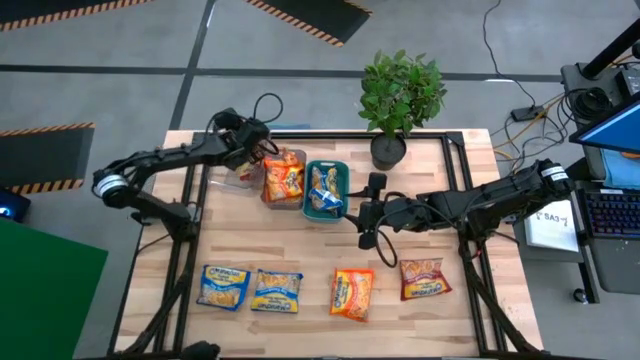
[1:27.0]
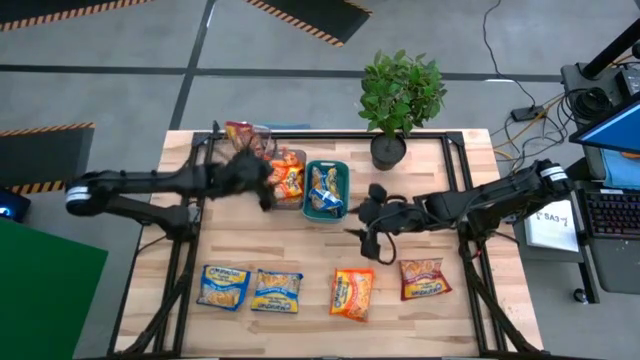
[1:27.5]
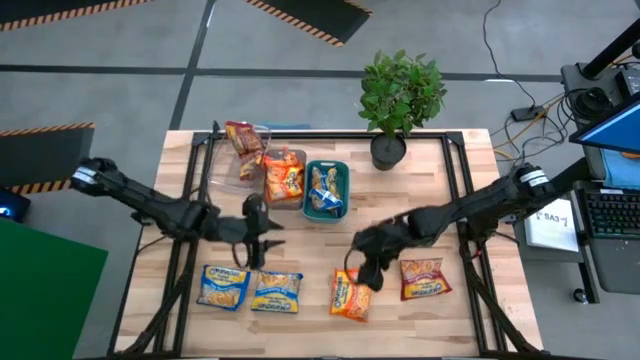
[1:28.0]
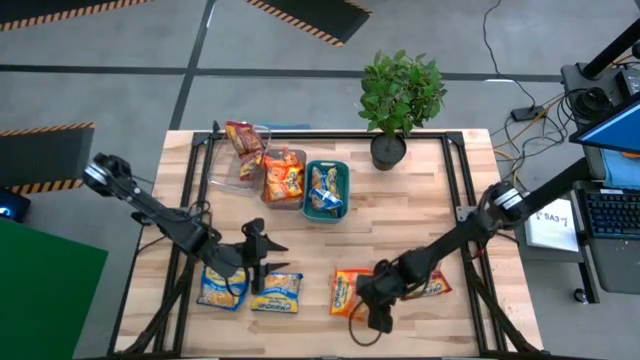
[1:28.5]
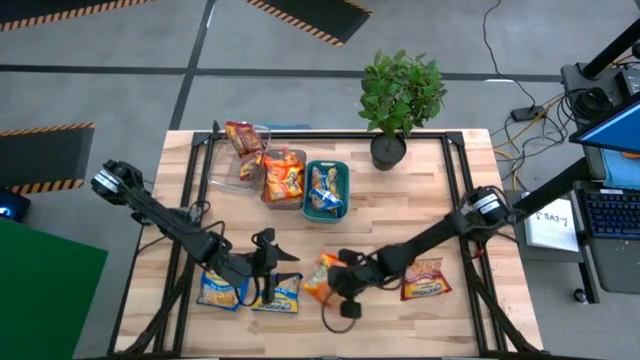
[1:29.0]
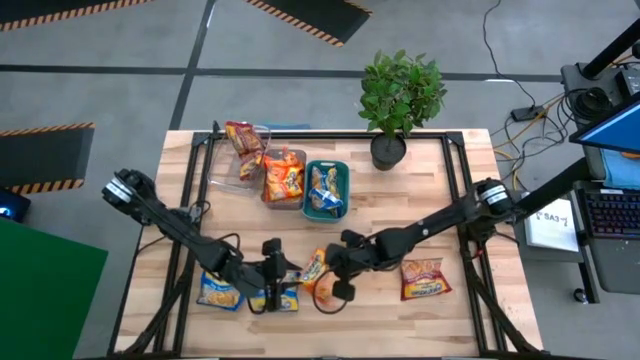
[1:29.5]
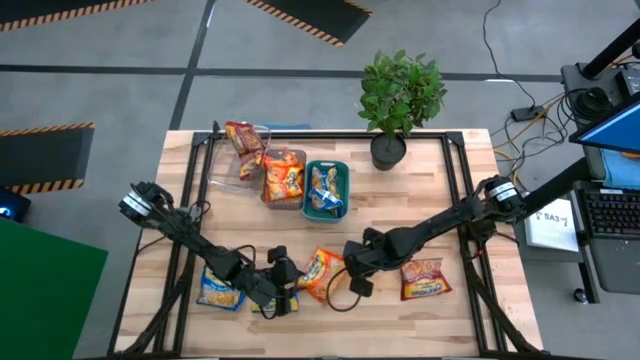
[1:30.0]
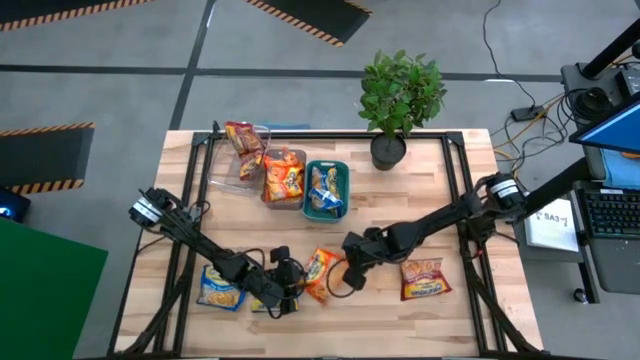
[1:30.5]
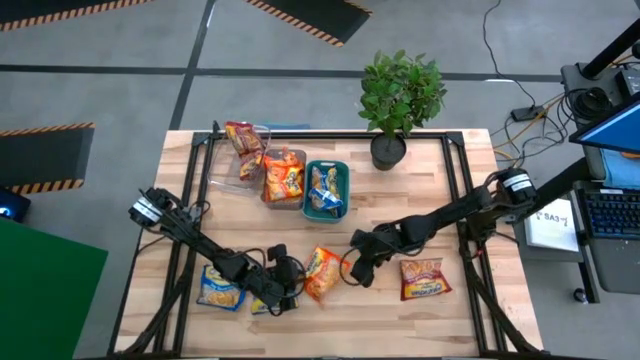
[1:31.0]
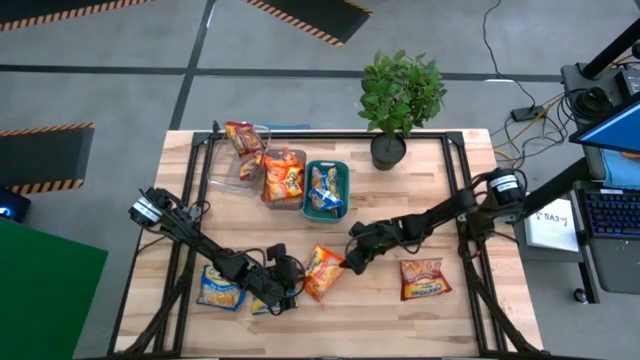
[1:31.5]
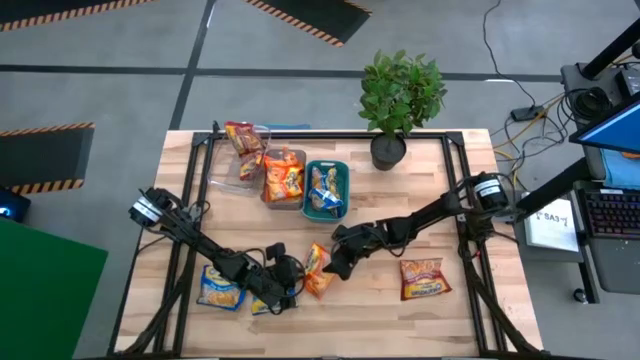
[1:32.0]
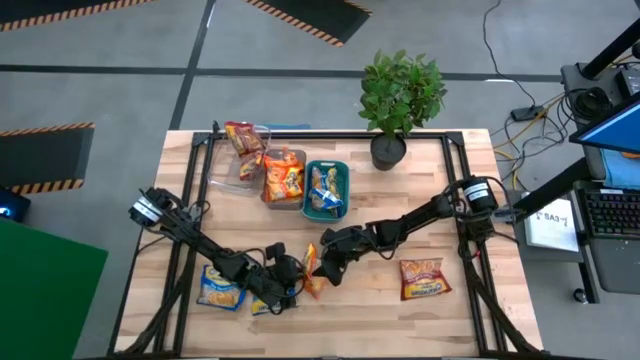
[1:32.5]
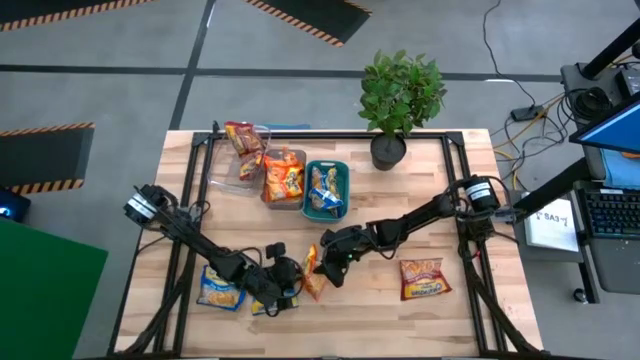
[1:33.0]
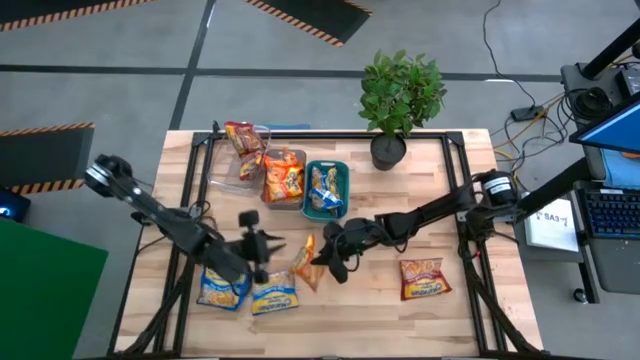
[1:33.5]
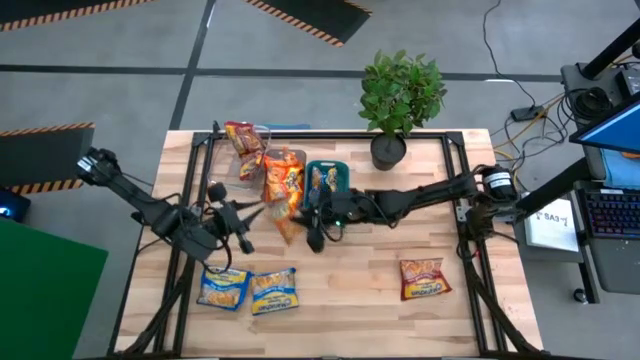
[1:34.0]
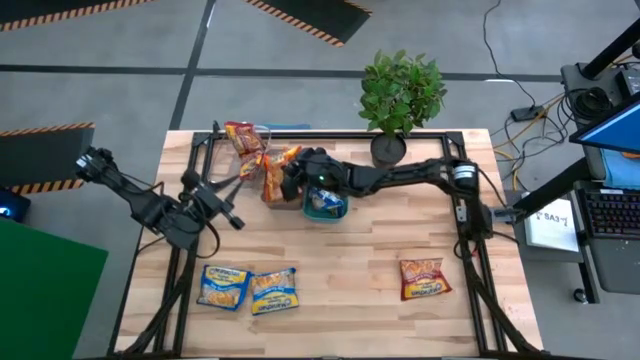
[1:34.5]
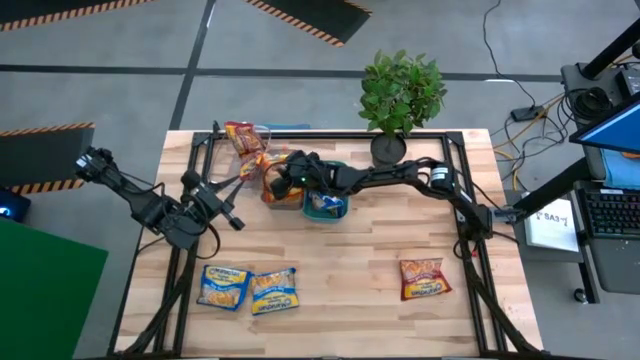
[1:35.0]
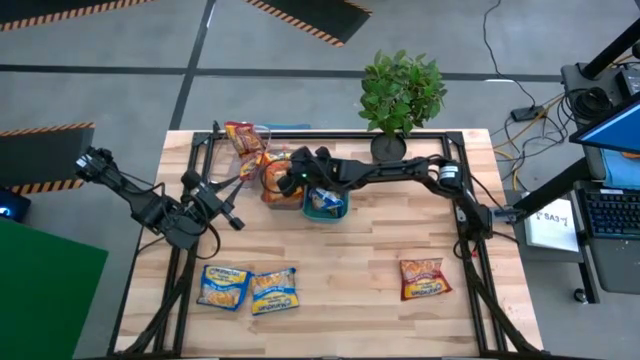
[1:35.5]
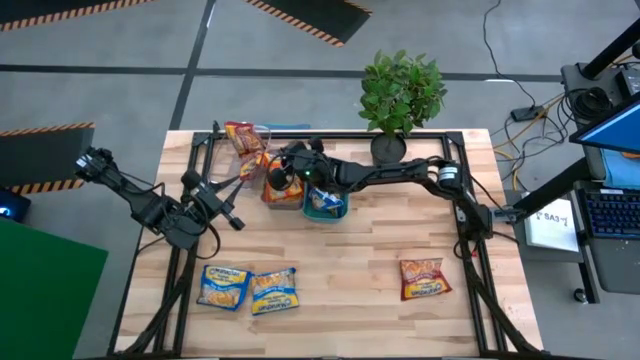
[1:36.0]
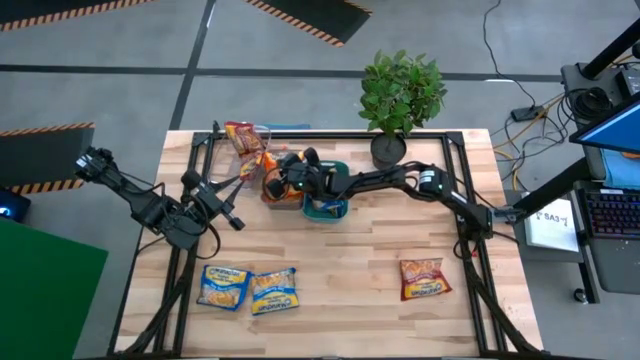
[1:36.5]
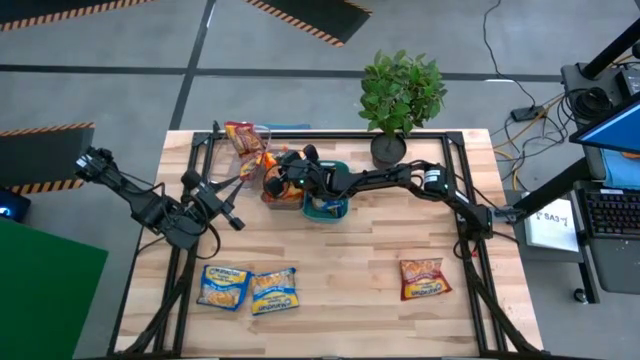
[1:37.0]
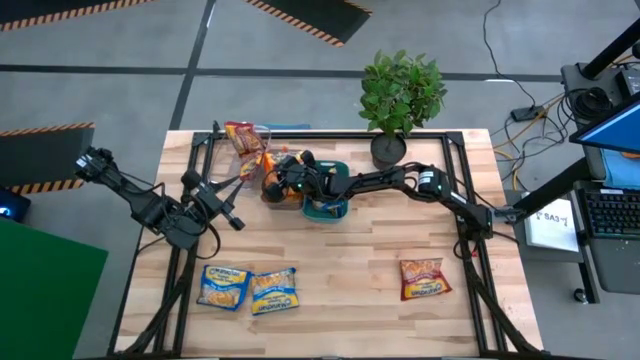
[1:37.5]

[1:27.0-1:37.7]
Task: Sort Maruchan noodles
Put the orange noodle pack into the black bin

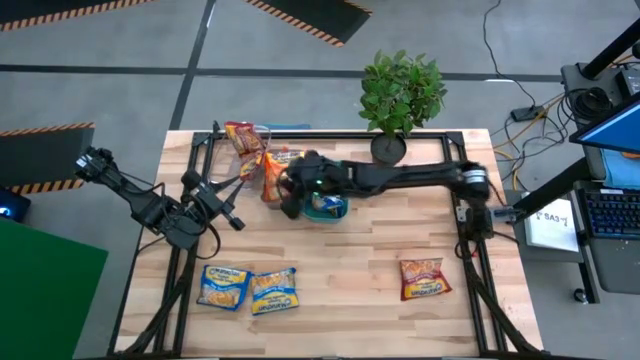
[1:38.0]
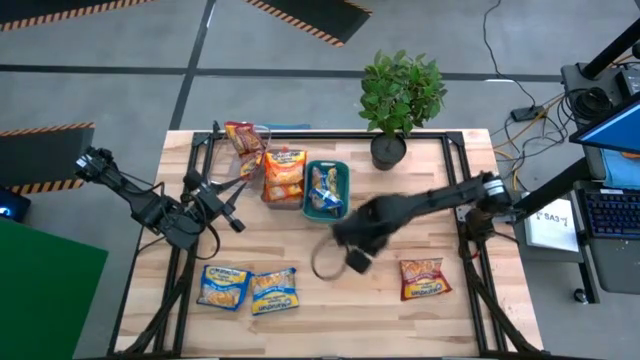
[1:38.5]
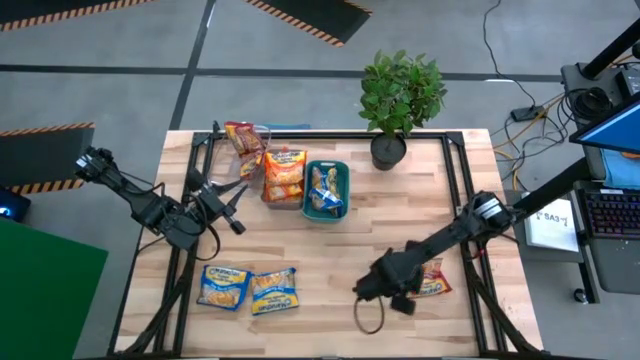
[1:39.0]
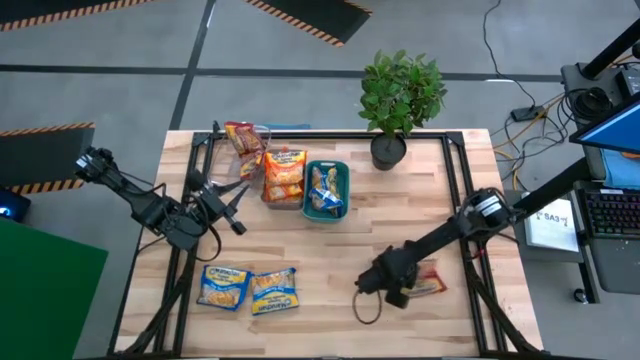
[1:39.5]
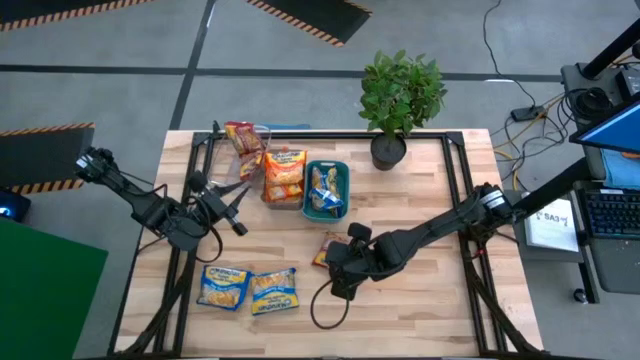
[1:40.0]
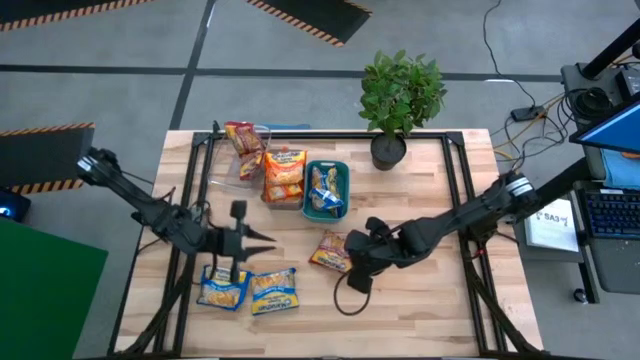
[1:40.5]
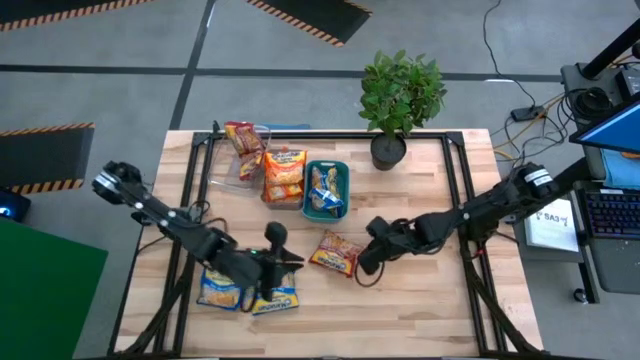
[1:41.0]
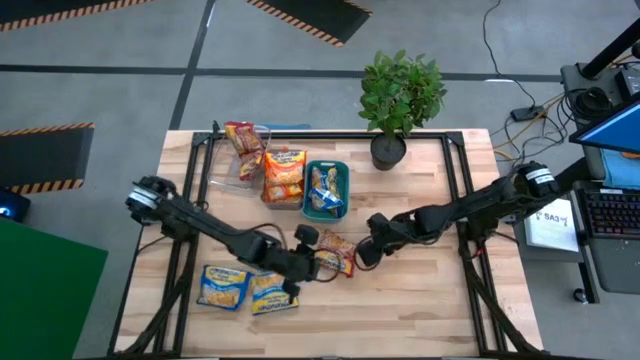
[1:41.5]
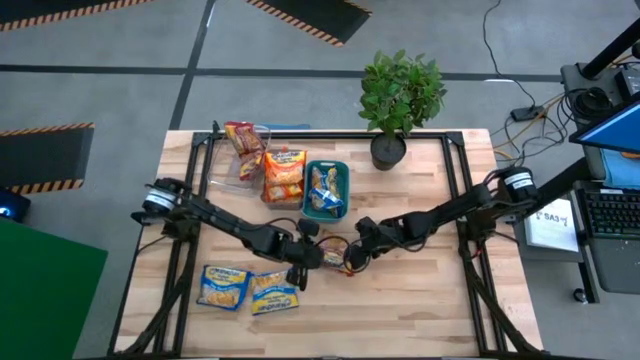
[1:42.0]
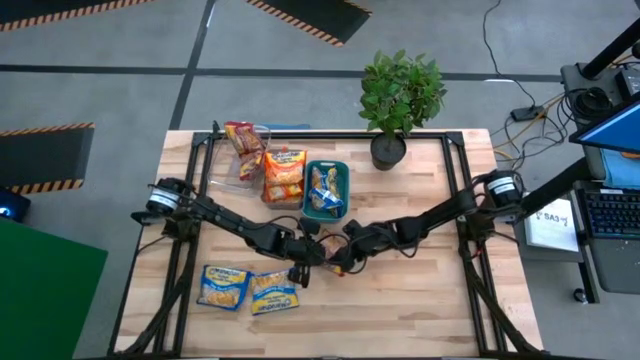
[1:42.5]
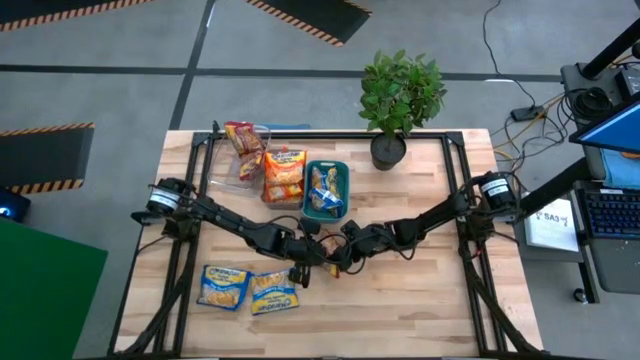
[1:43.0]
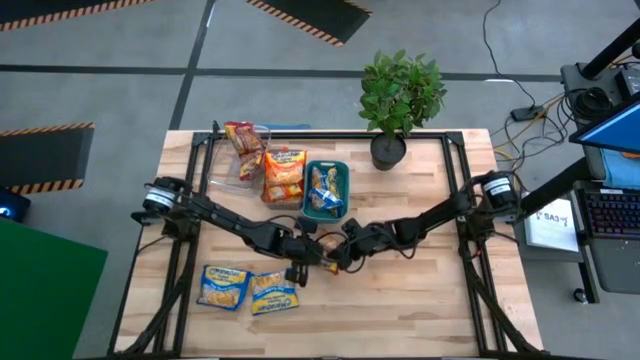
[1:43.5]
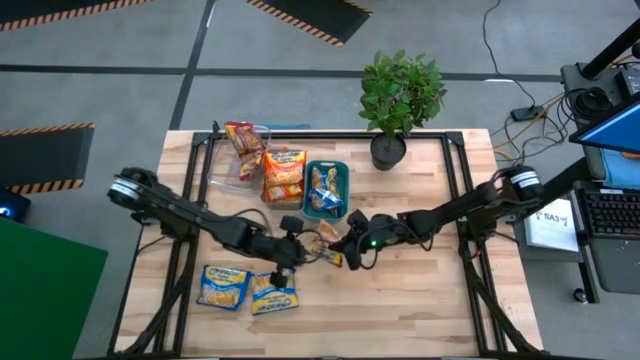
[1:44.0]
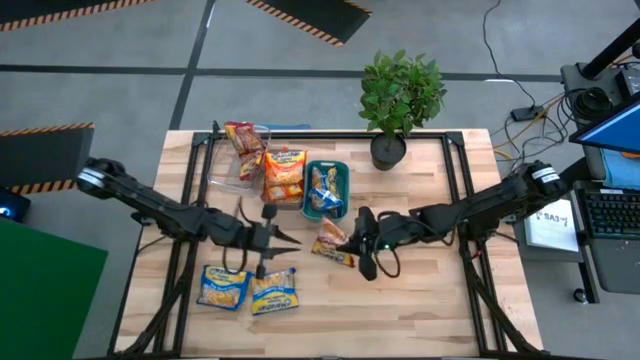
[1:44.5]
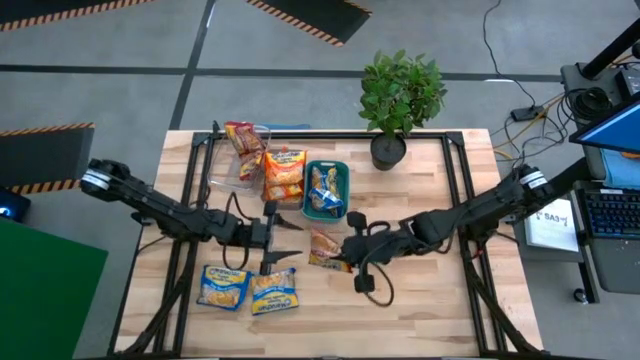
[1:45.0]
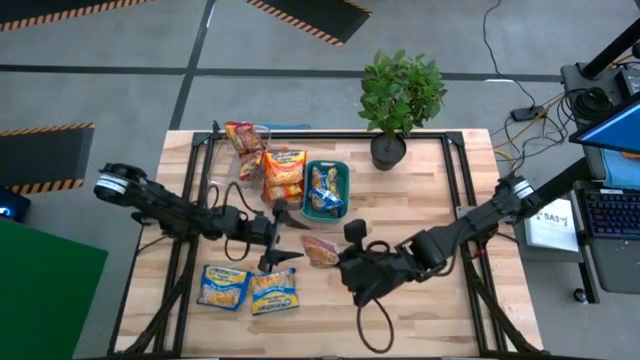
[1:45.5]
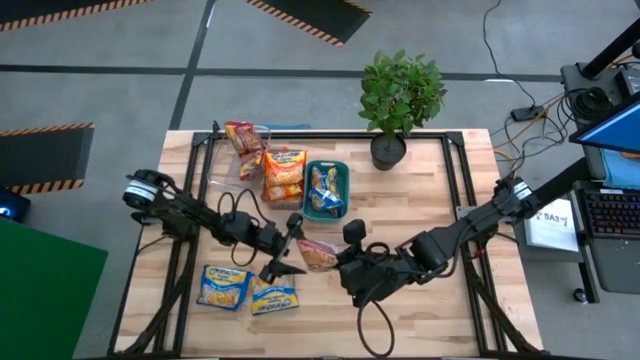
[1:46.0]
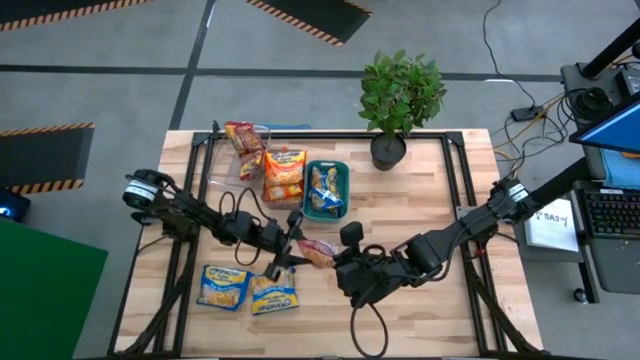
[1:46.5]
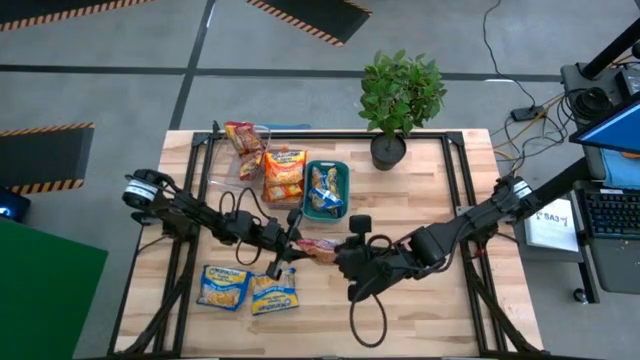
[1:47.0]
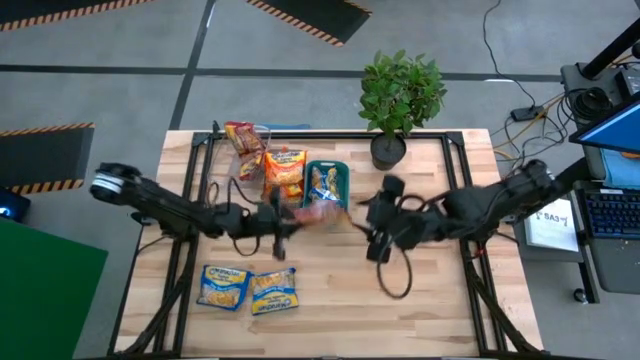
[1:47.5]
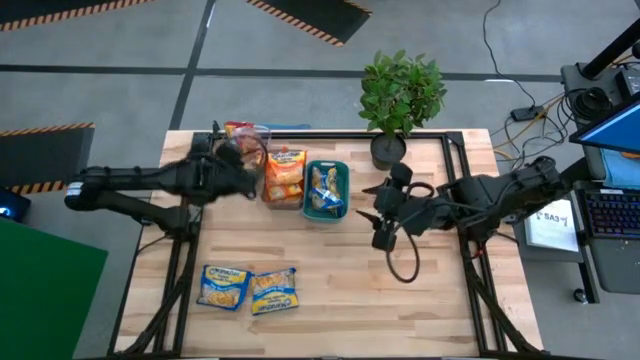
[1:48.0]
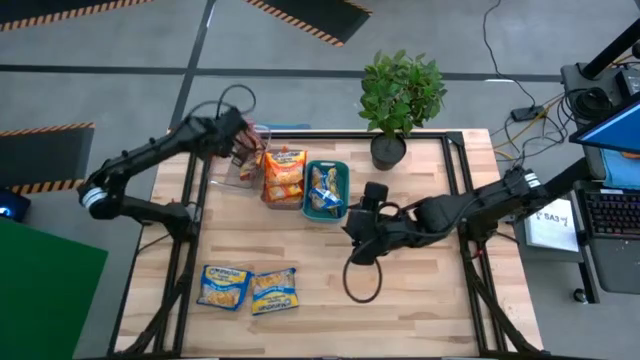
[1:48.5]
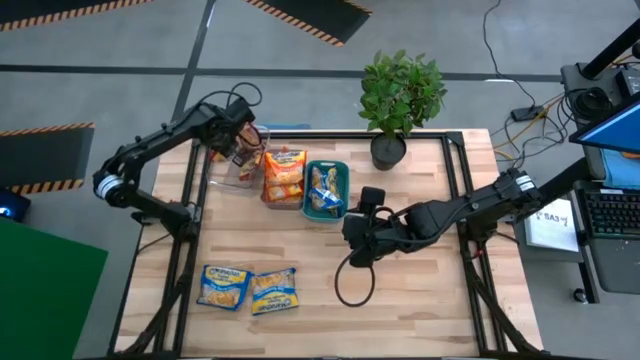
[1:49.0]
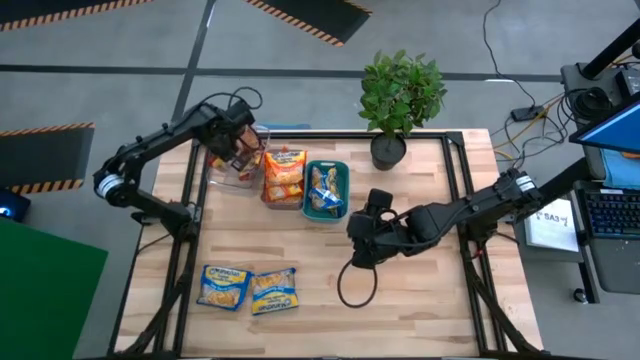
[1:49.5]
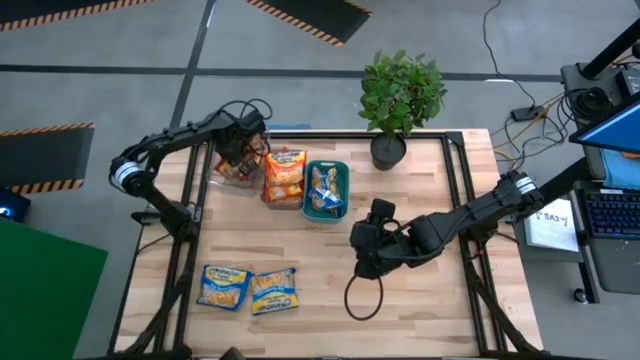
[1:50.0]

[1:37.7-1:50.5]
Put the red noodle pack into the transparent bin
